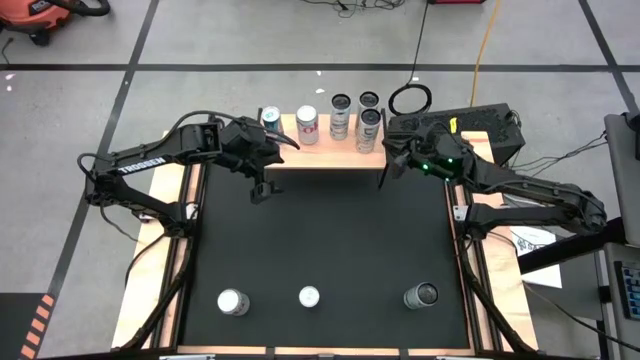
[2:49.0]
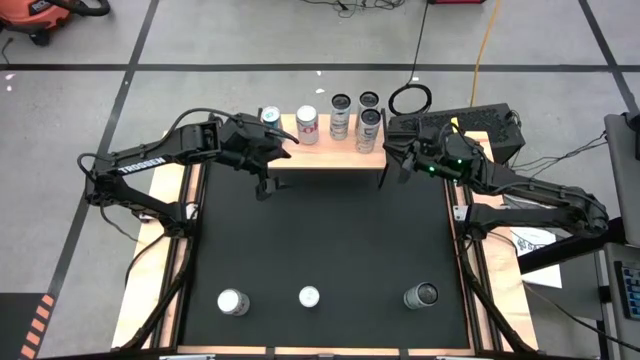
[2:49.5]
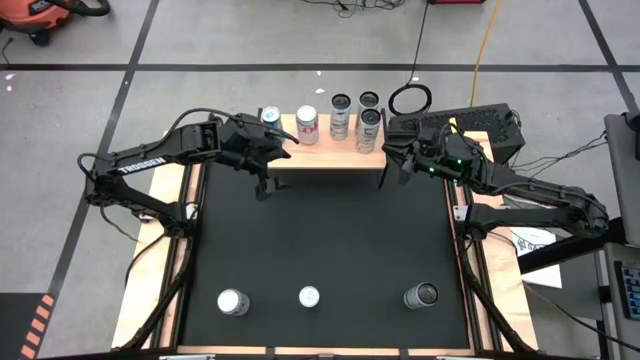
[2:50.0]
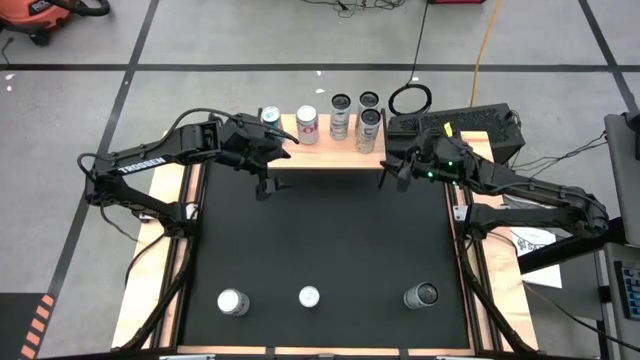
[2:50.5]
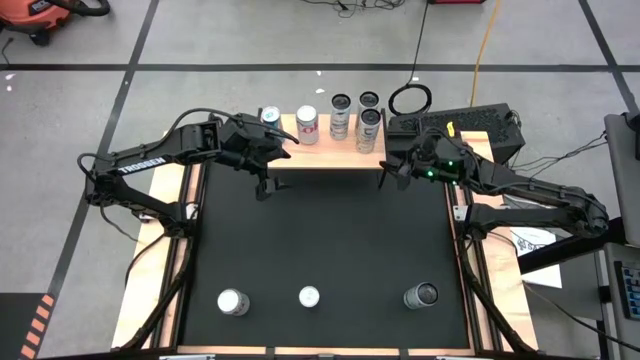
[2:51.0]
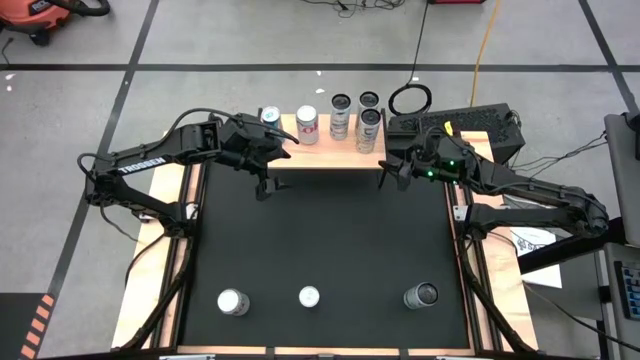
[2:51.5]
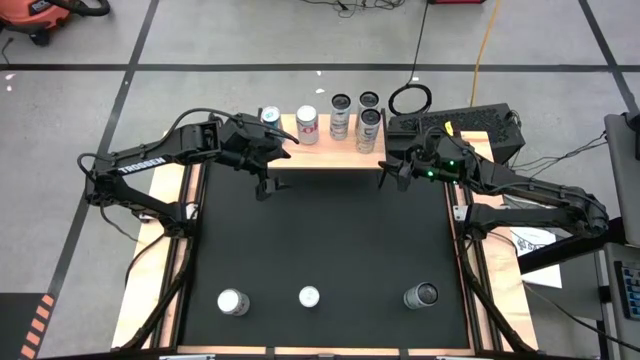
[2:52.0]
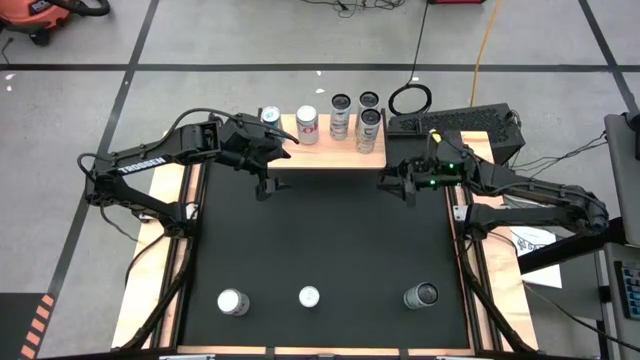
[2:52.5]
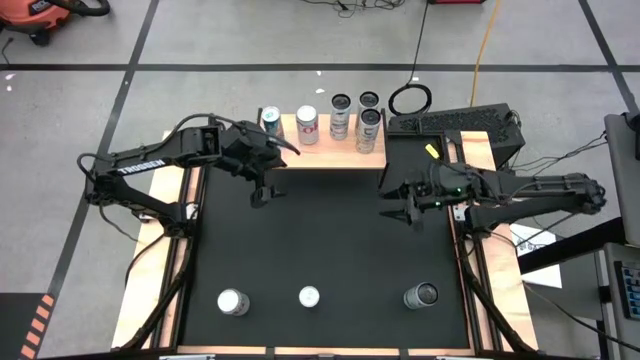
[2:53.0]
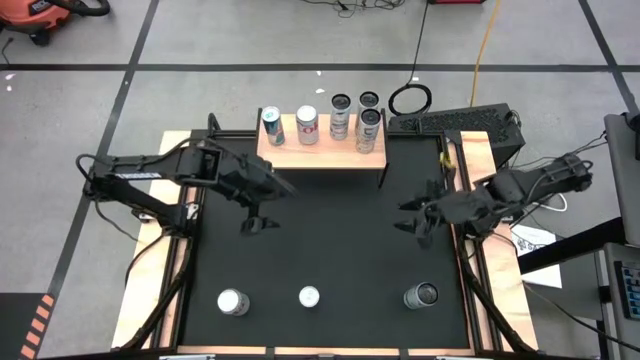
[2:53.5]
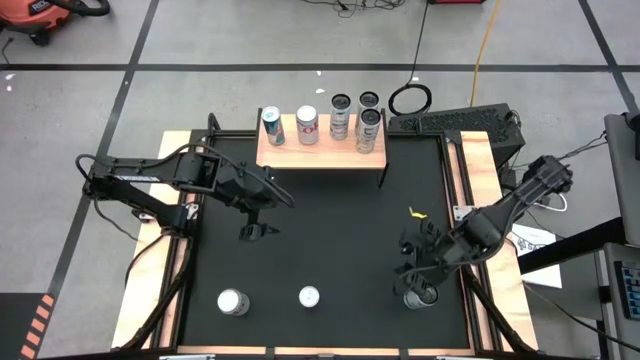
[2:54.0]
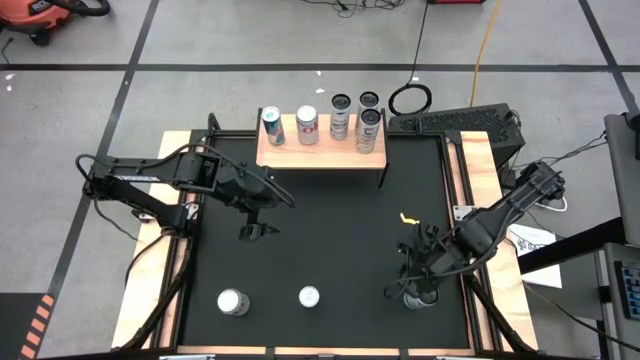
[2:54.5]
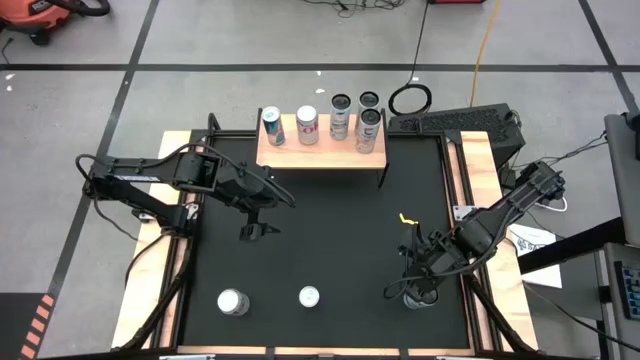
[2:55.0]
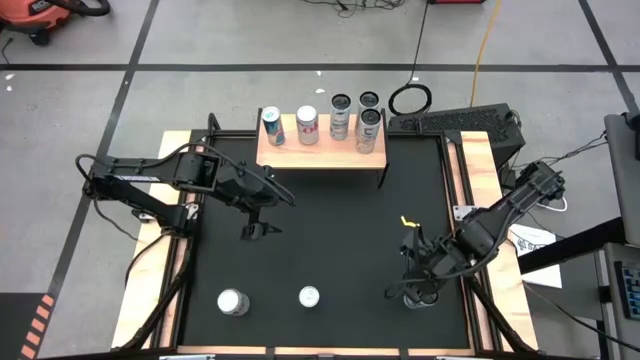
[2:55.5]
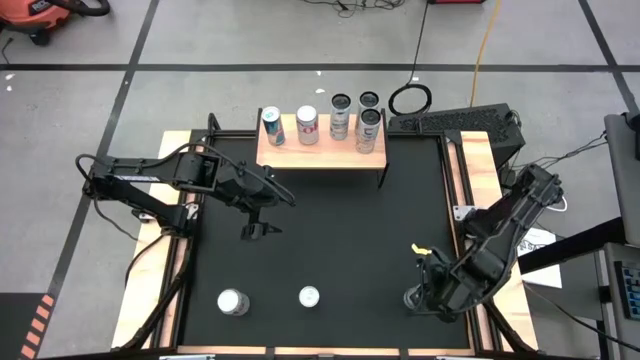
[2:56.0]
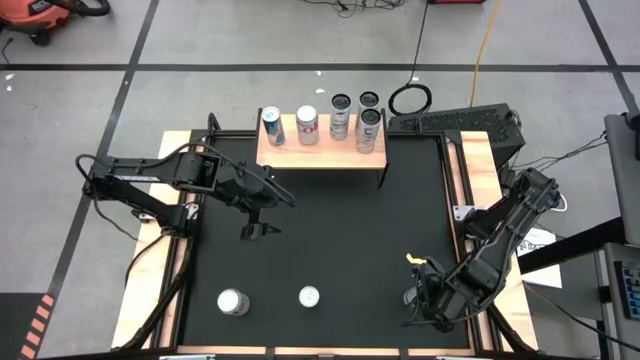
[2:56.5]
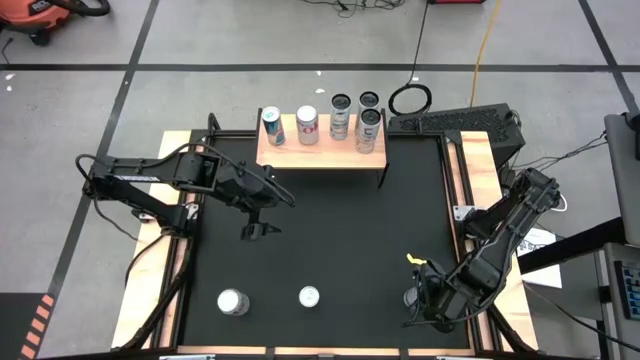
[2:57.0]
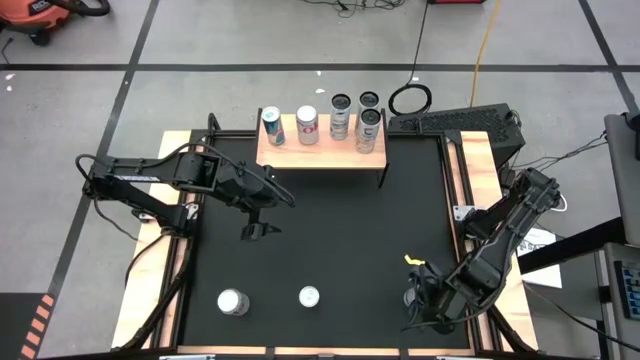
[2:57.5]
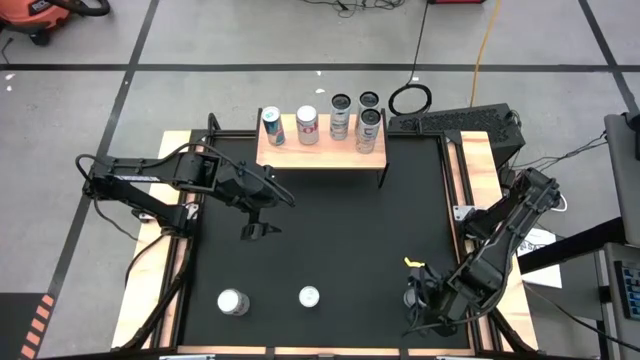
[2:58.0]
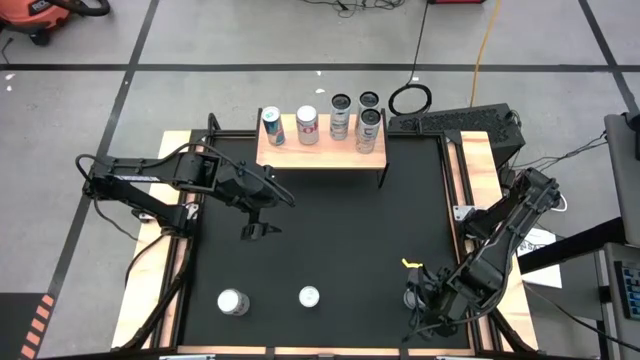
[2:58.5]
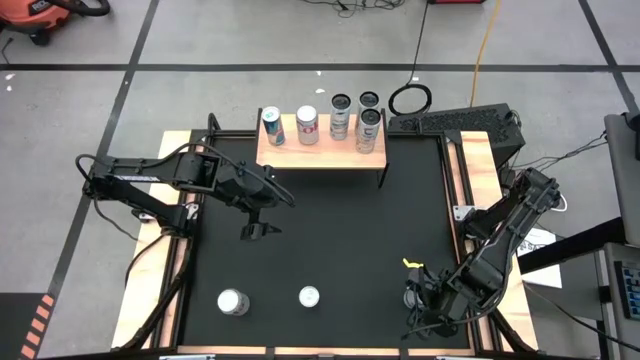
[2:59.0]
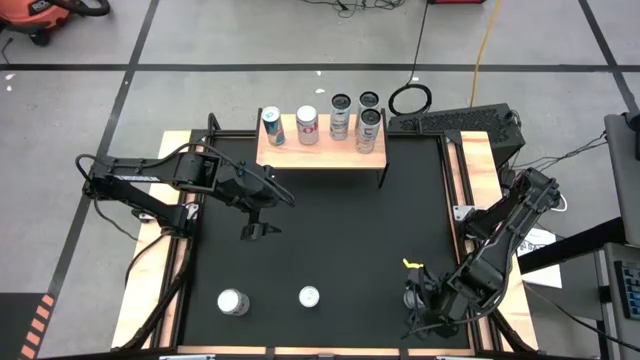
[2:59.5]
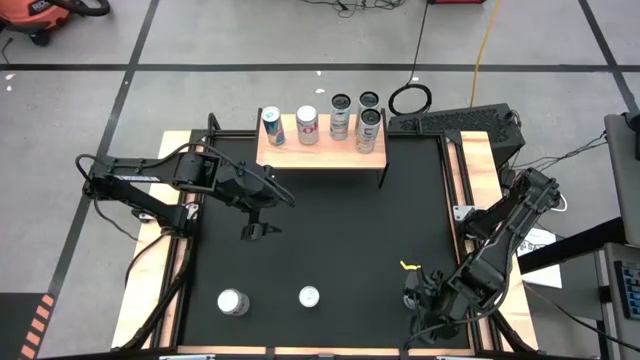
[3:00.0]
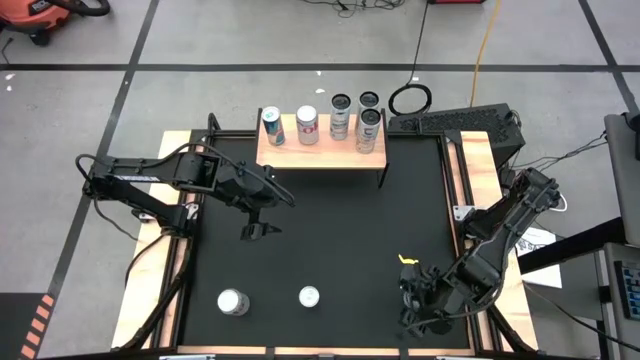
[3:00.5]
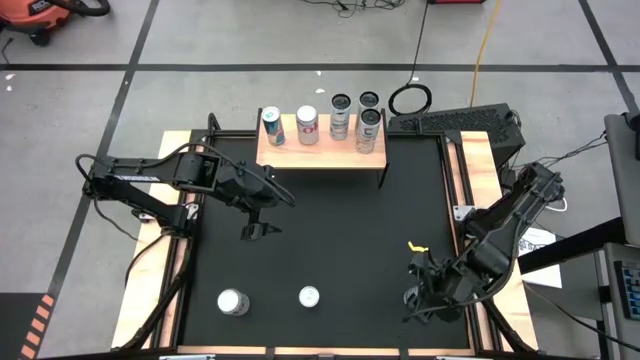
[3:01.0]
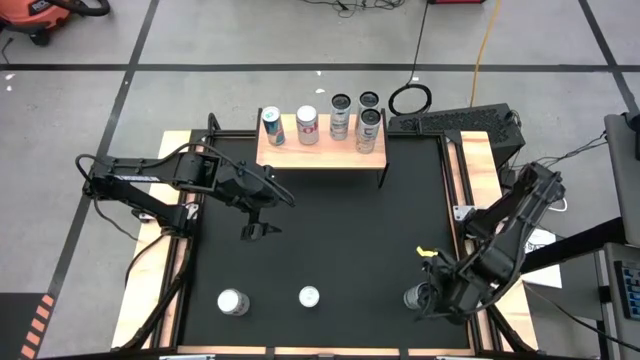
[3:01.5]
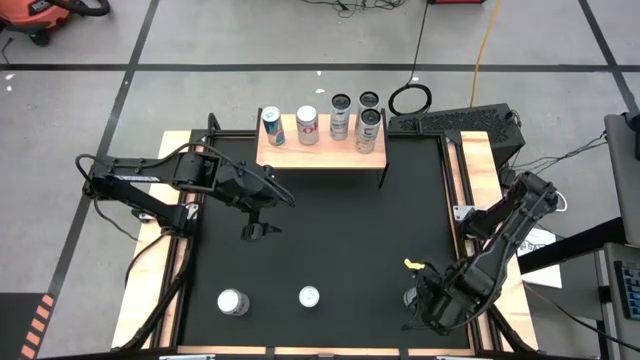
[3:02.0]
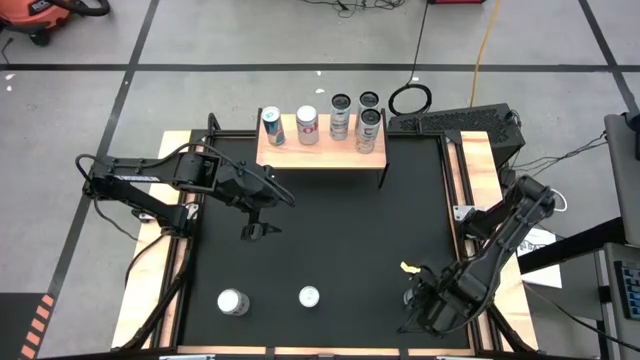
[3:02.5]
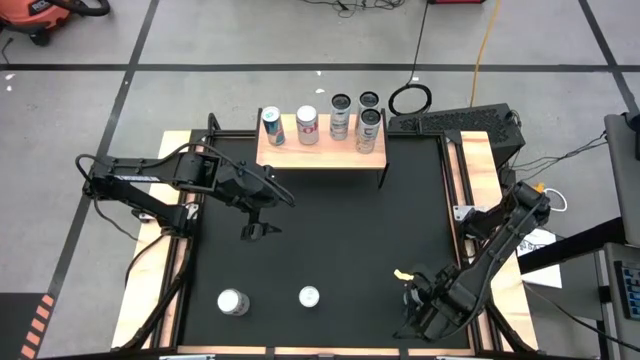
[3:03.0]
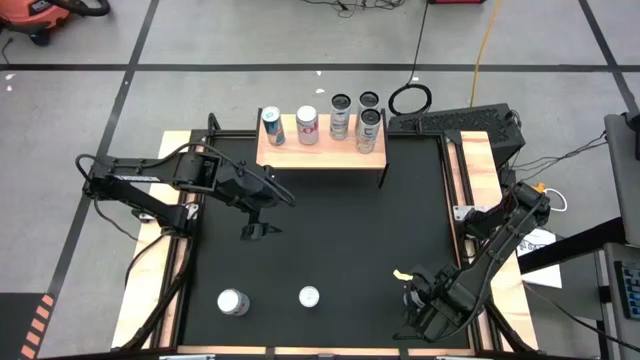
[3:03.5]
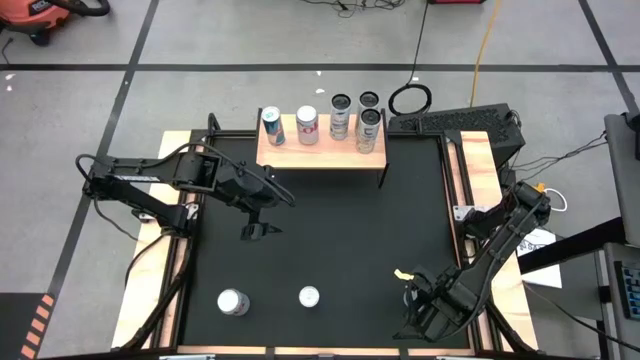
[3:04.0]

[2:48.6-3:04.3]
Task: Place canned beverage on shelf
Put the white blue soda can on the shelf aligned with the other white blue soda can

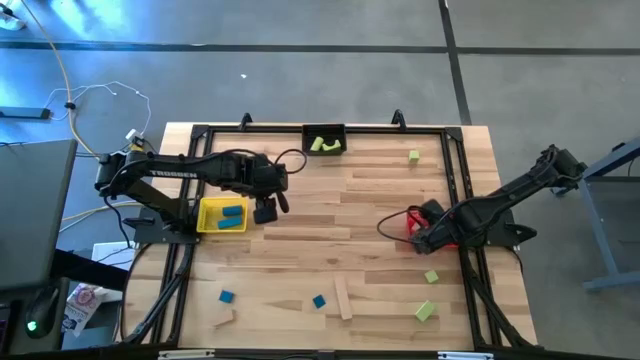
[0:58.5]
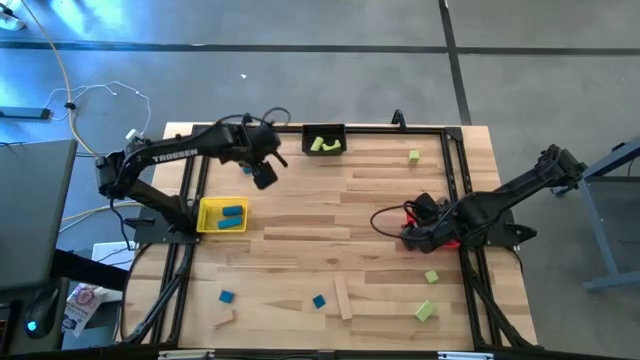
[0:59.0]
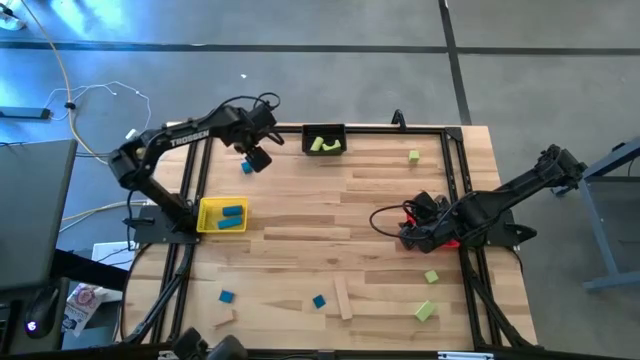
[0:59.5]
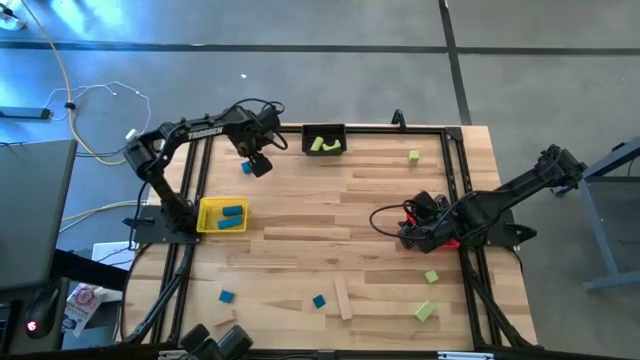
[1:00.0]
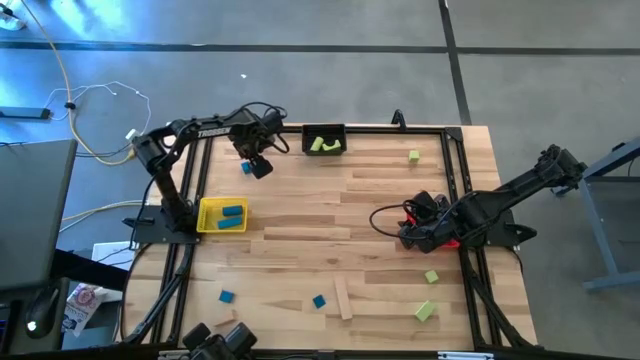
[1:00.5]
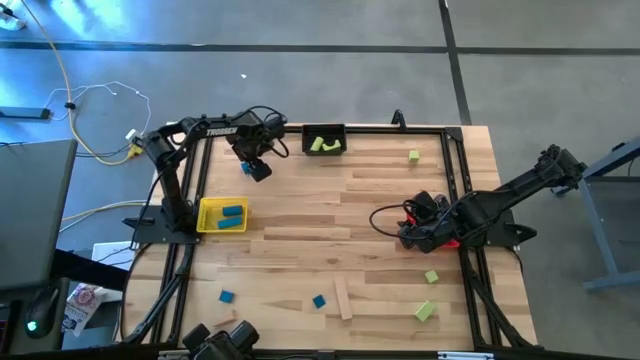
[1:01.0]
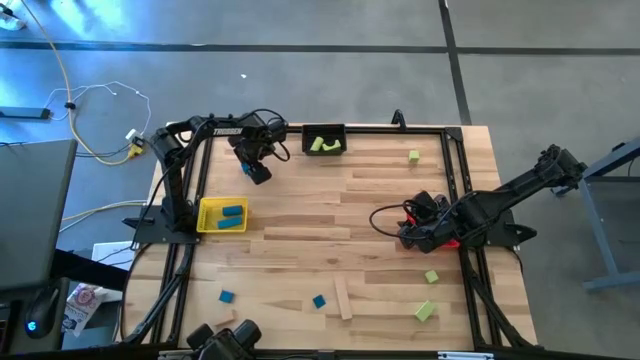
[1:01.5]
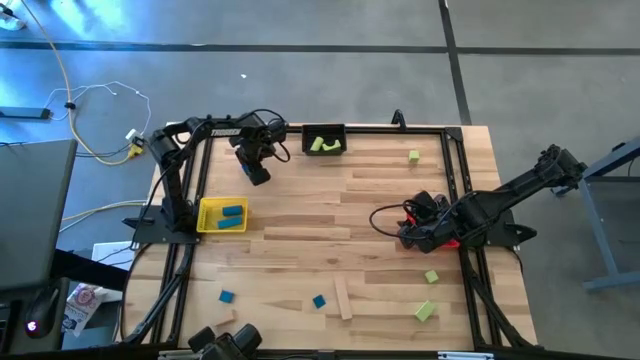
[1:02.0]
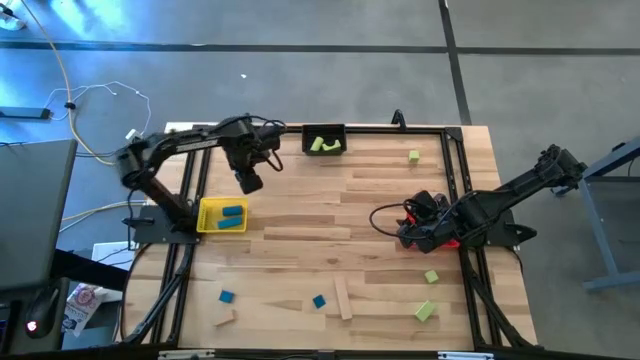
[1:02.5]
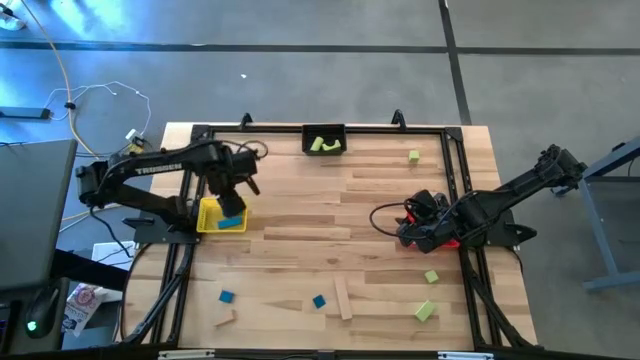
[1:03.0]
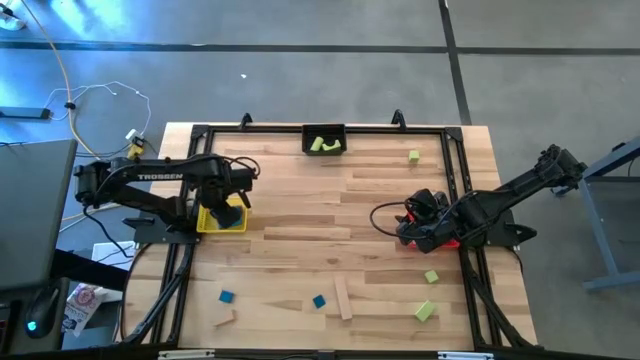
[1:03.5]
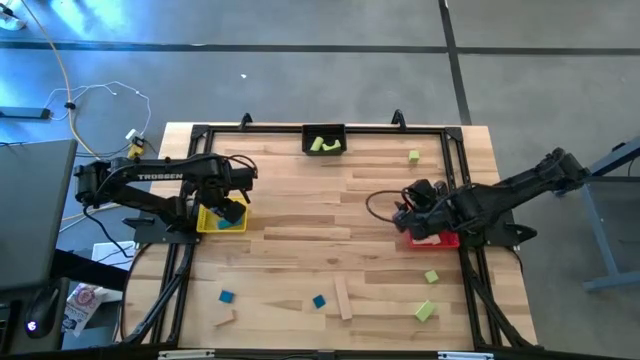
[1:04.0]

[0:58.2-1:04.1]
Task: Sort & place blocks by color
Put the blue block into the yellow bin
